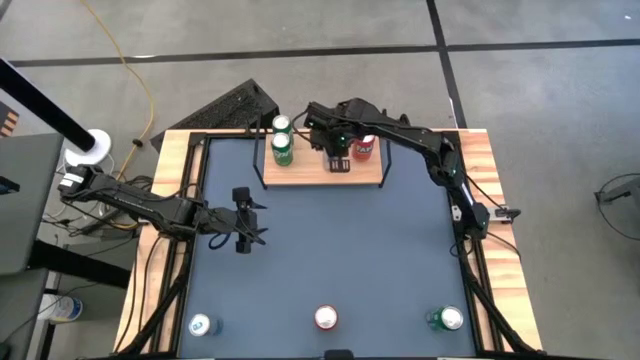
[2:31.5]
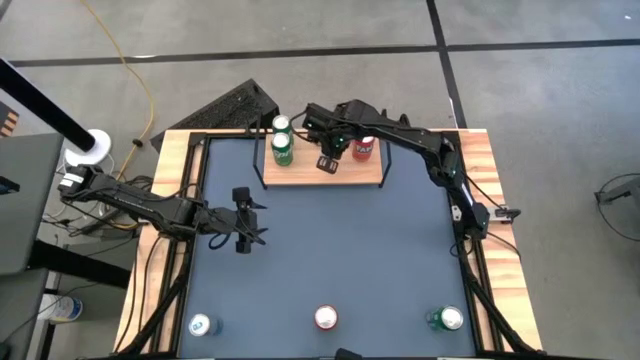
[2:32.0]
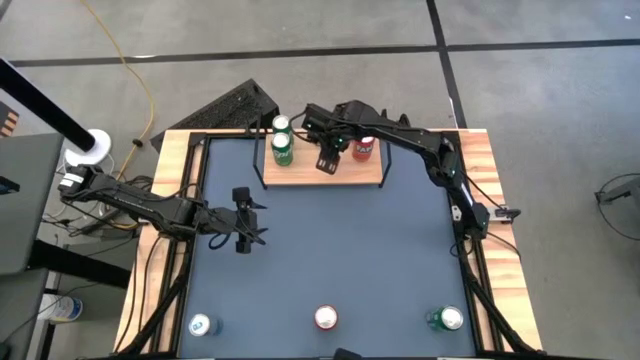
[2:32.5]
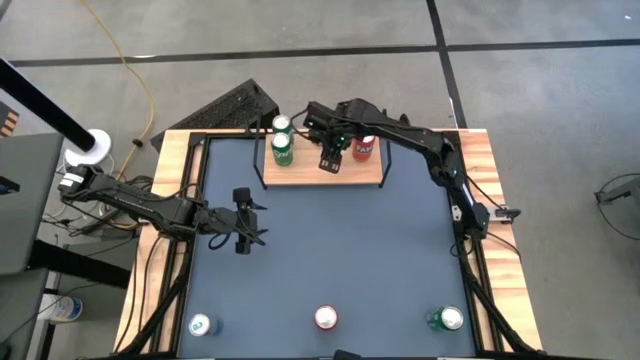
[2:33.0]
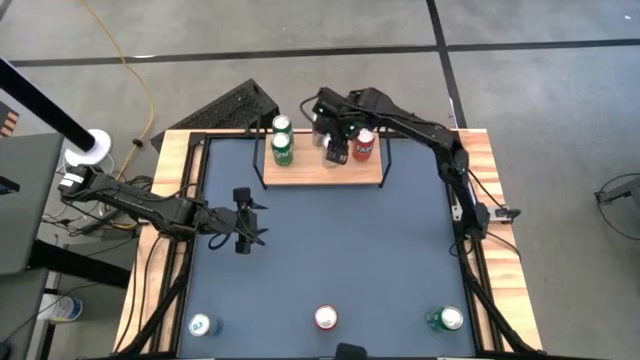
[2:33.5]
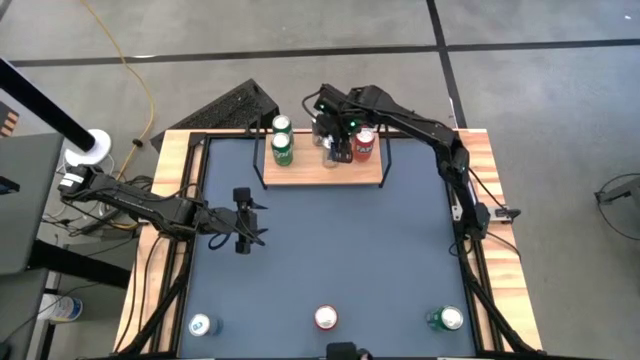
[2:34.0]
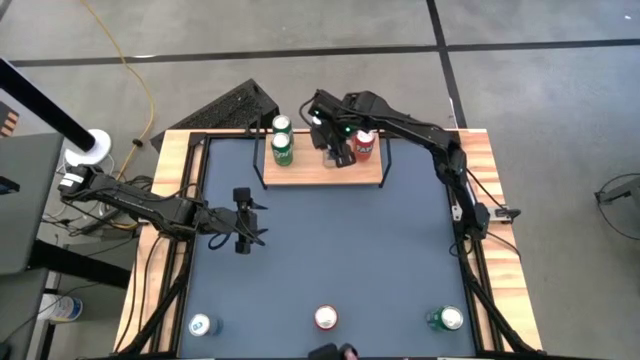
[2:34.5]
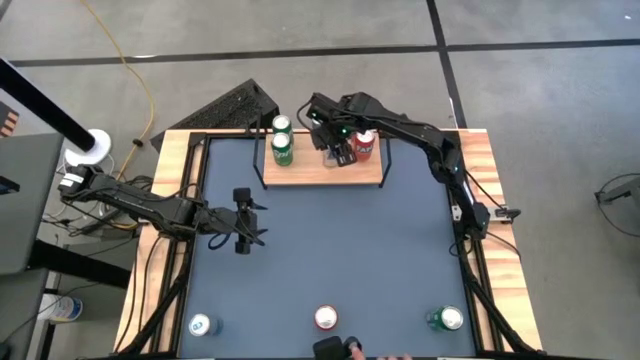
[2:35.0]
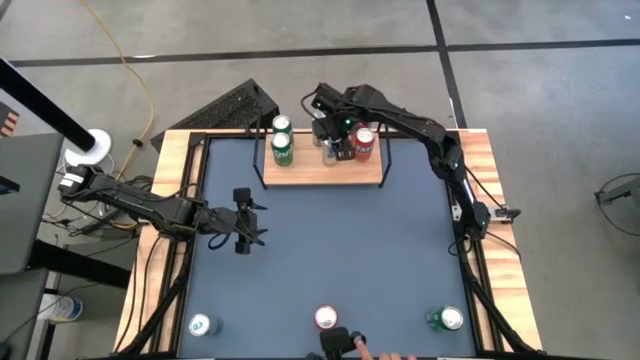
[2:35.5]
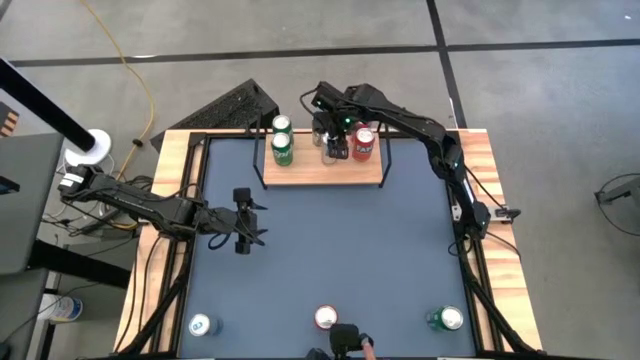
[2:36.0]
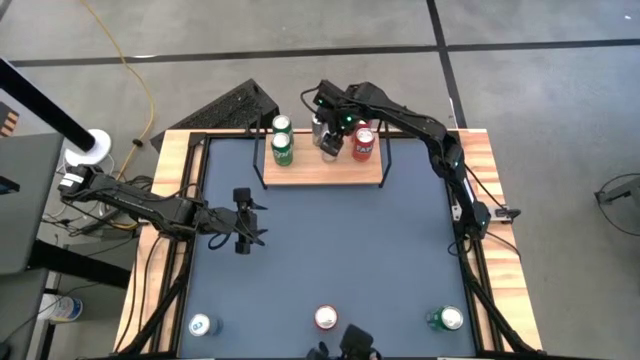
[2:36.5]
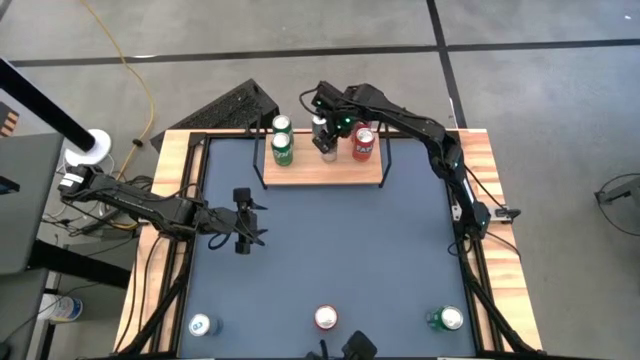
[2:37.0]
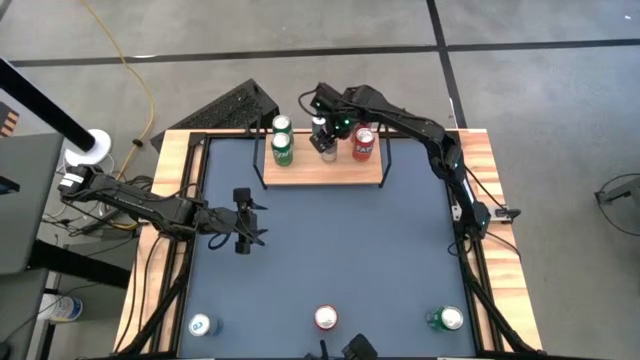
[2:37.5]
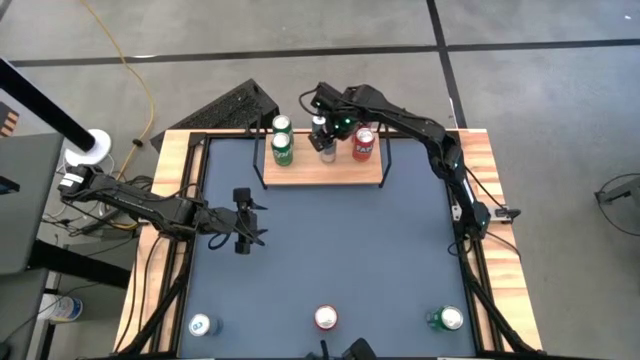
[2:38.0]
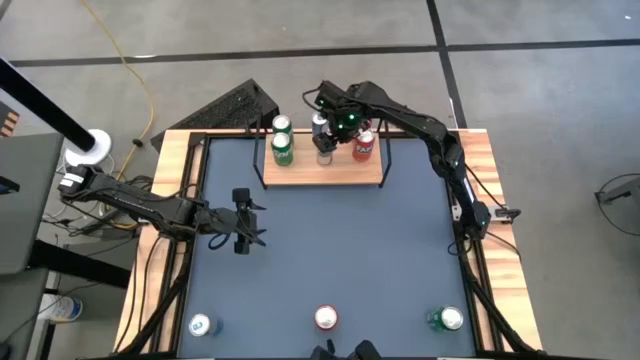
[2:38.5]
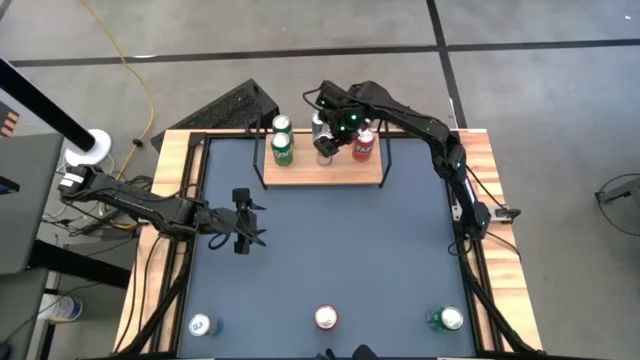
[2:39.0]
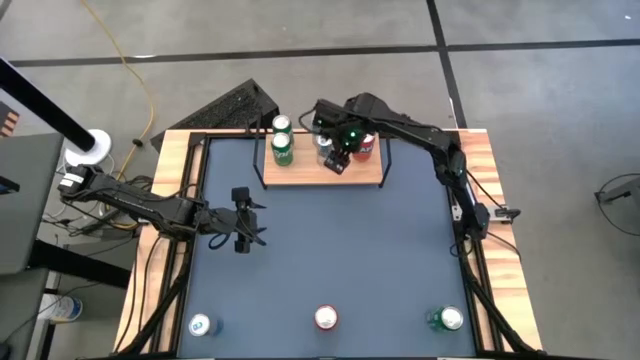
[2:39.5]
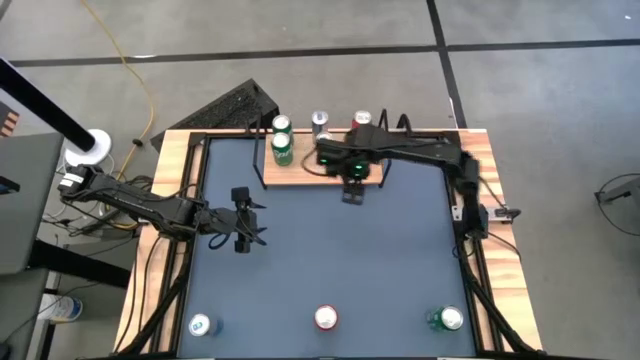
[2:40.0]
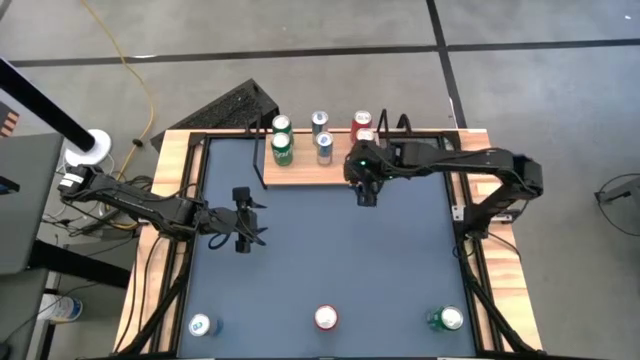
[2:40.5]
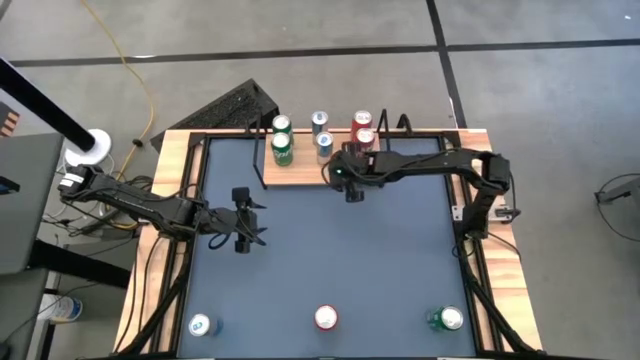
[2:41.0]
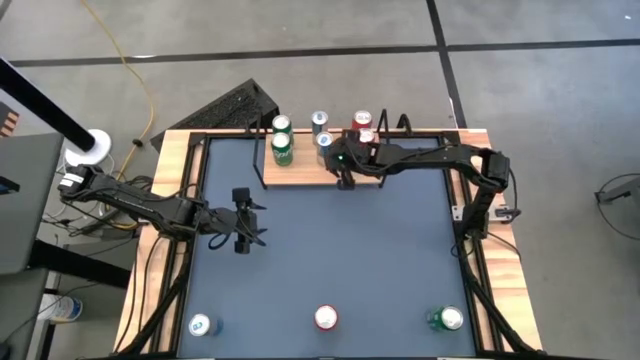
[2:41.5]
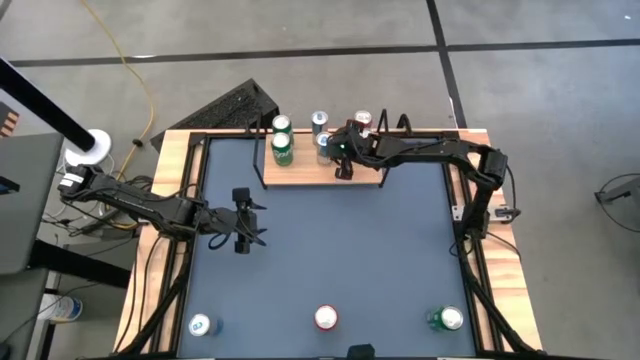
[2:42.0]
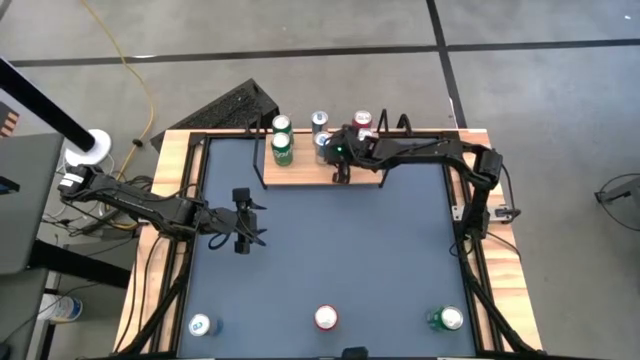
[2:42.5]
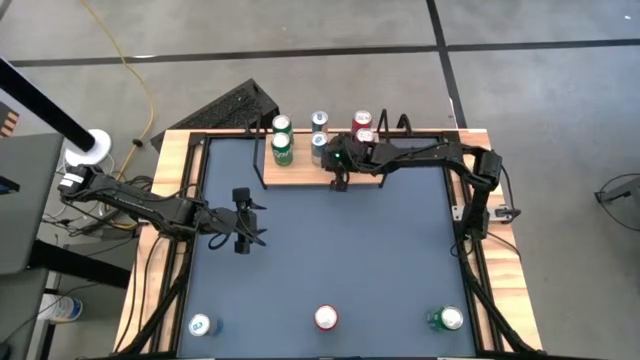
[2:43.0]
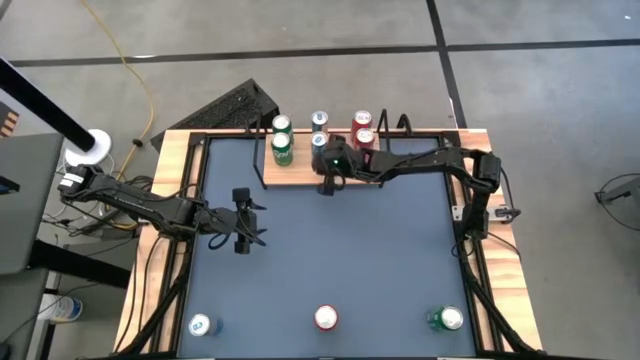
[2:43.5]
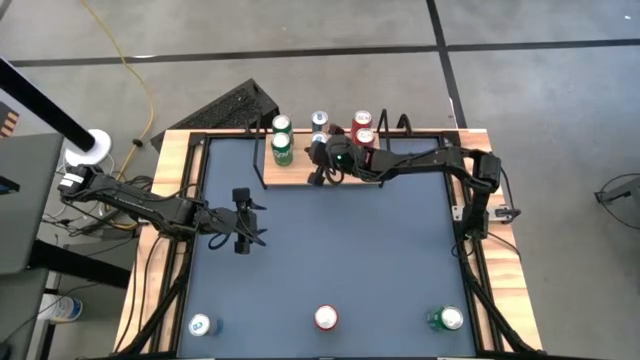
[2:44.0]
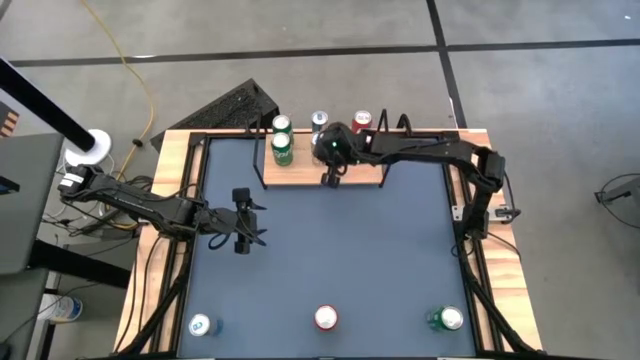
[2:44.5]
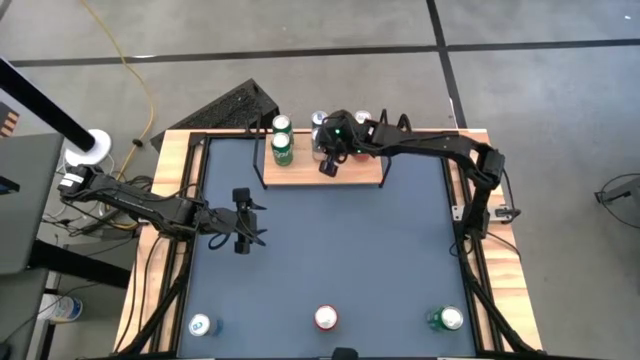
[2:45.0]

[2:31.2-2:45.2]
Task: Place canned beverage on shelf
Put the top blue soda can on the shelf aligned with the other blue soda can

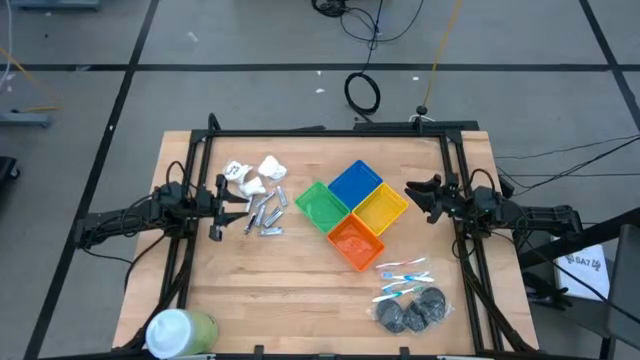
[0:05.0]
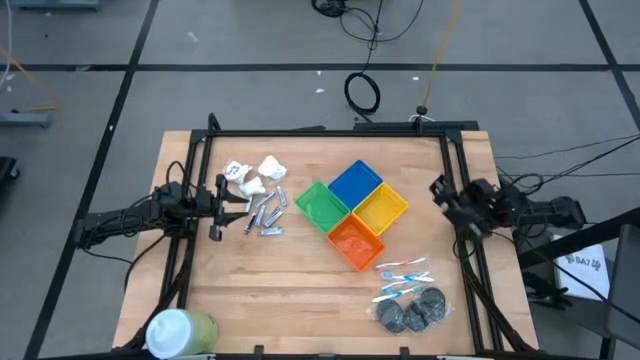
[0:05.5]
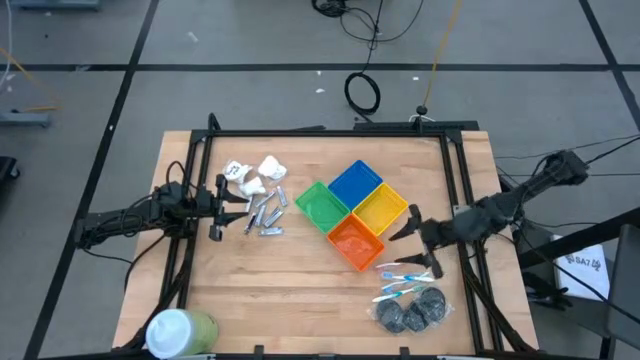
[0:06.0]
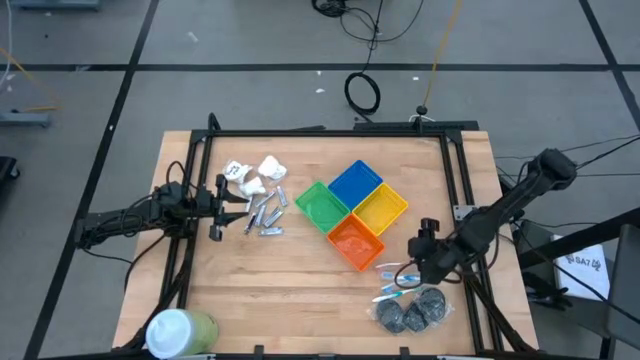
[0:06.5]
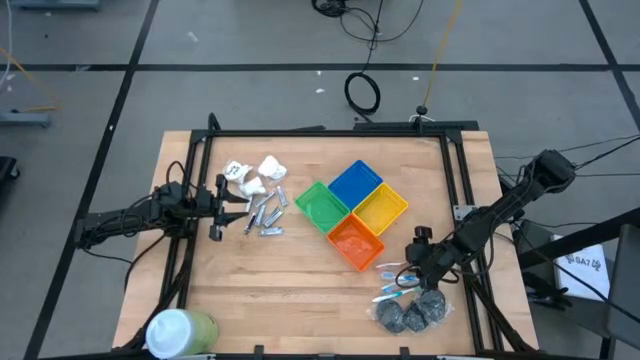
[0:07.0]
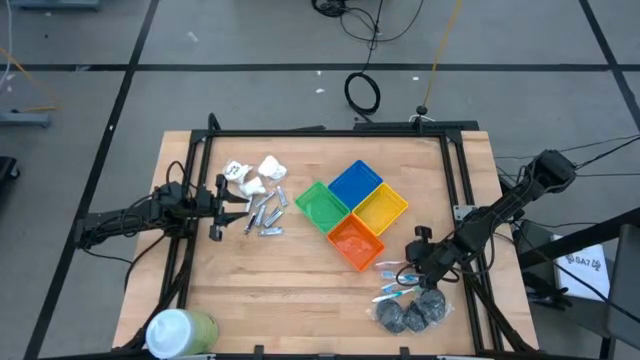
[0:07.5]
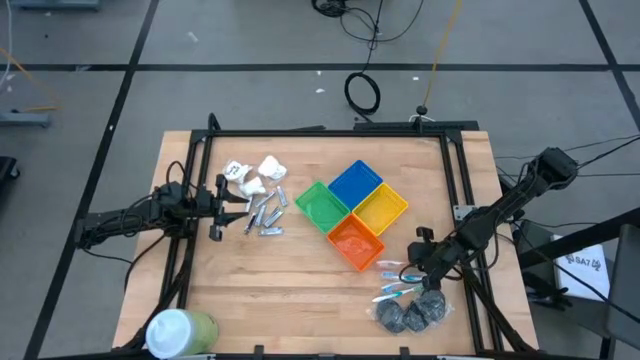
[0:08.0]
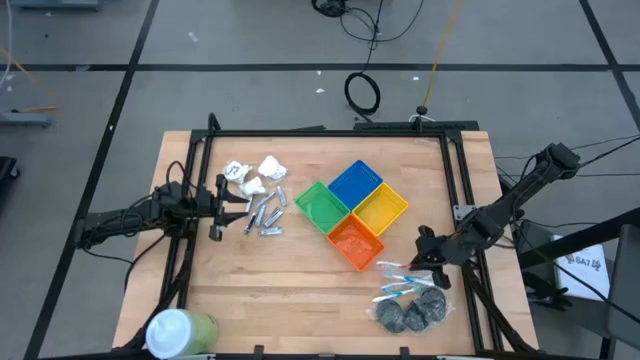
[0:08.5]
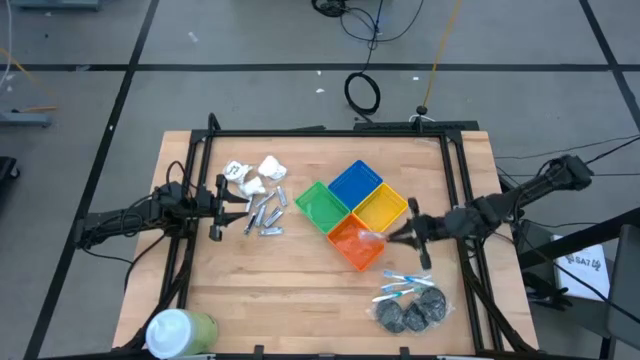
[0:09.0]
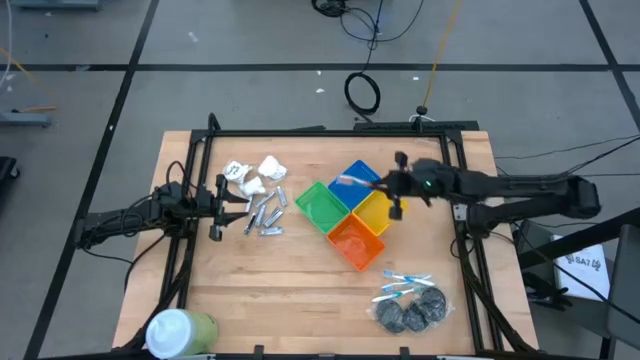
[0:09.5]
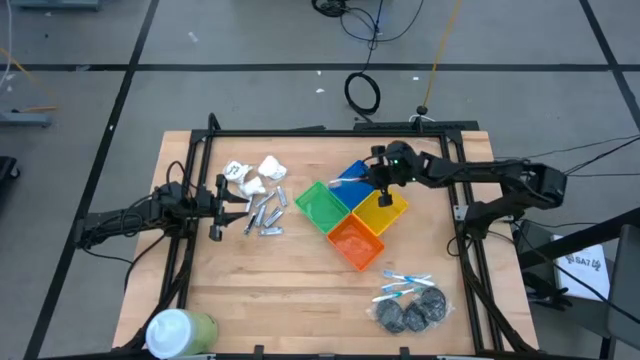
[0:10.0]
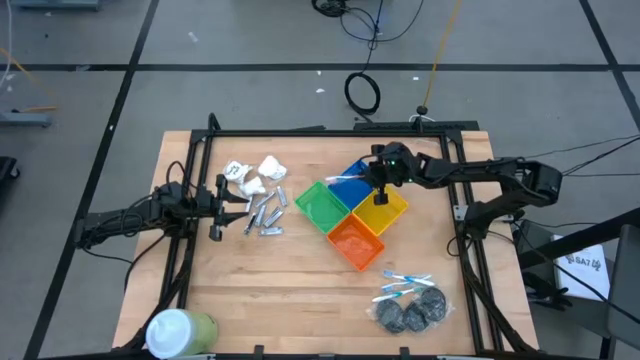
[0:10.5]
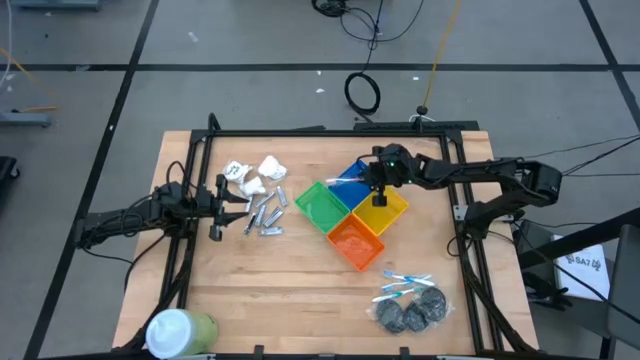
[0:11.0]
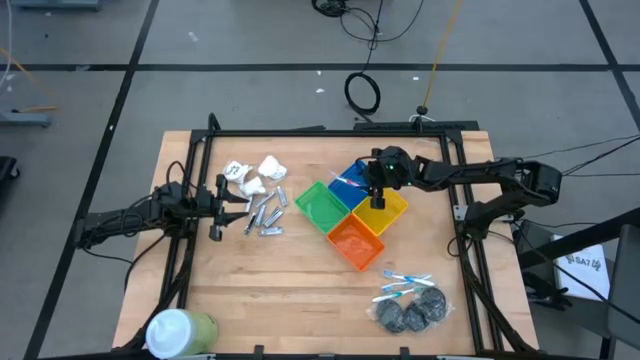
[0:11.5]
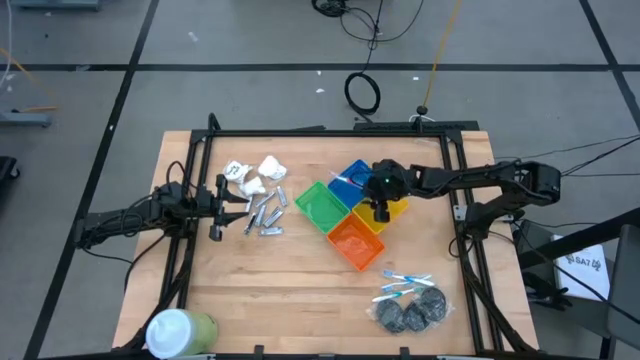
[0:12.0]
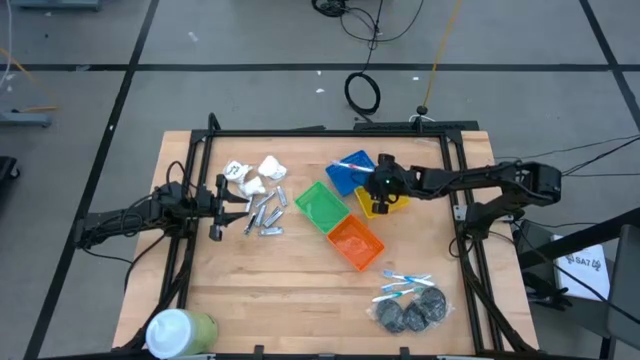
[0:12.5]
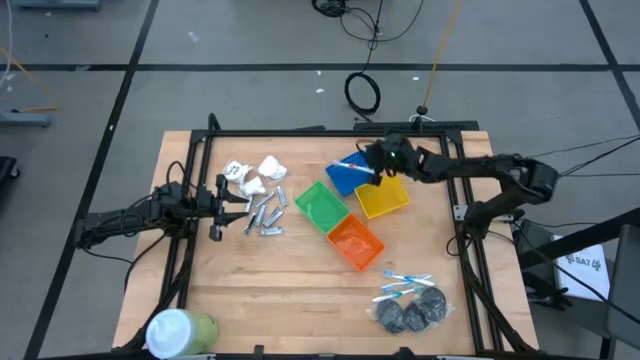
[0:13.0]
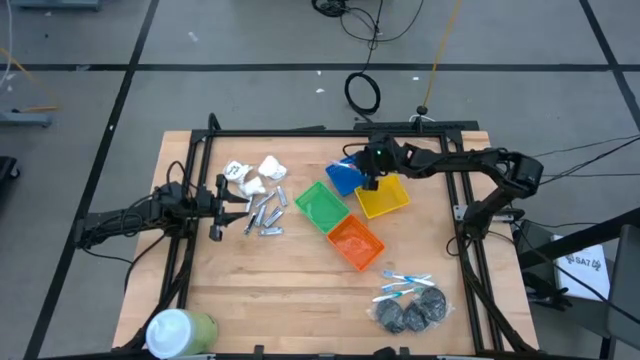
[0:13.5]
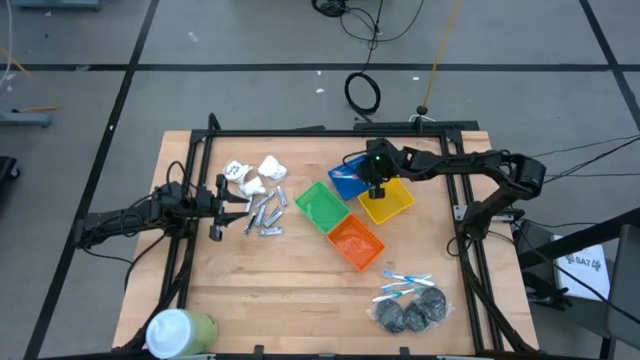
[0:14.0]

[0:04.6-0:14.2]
Task: Pick & Place Travel size toiletries
Put the orange toothbrush into the blue bin
